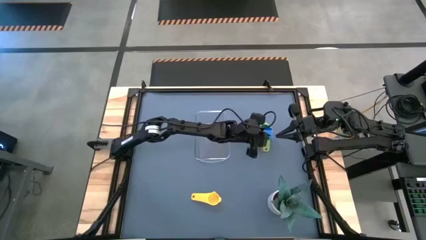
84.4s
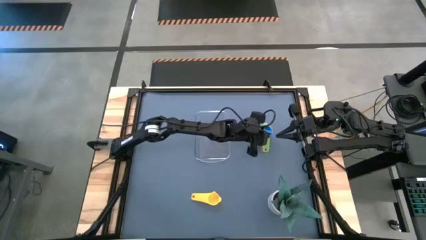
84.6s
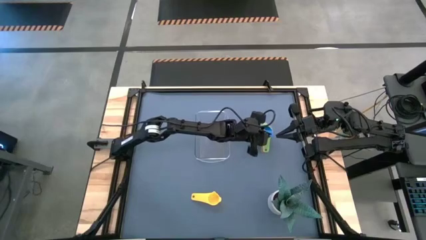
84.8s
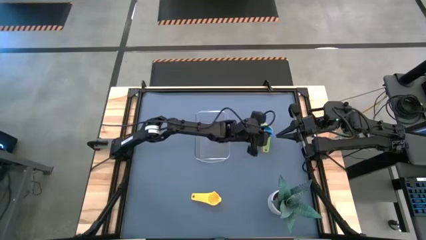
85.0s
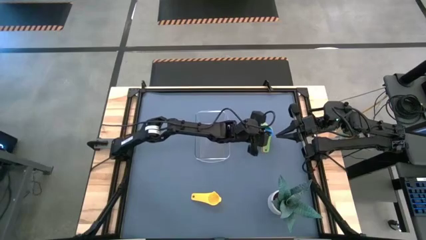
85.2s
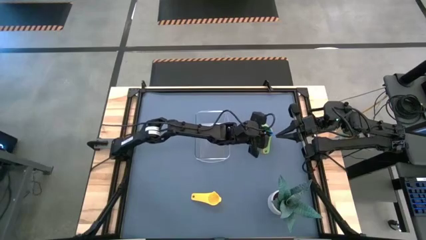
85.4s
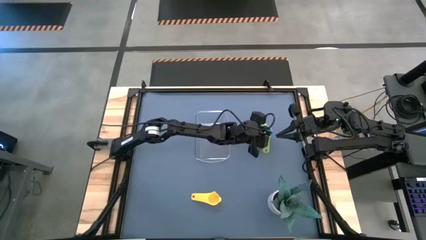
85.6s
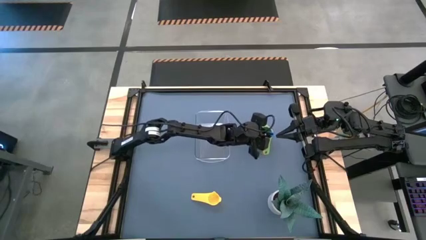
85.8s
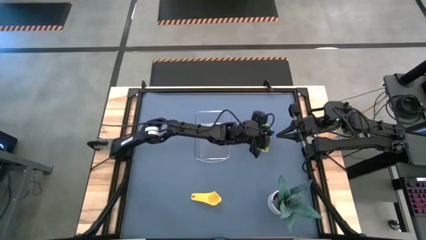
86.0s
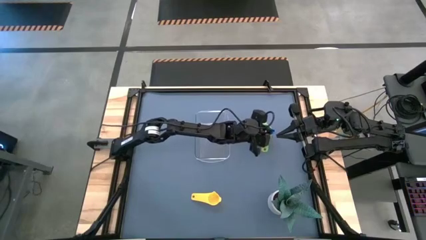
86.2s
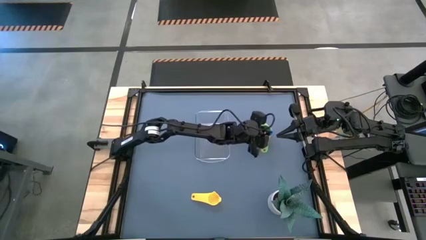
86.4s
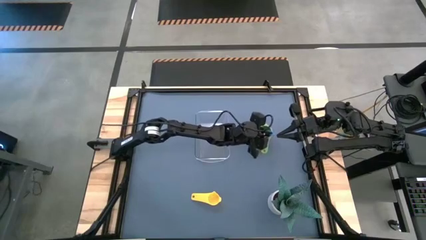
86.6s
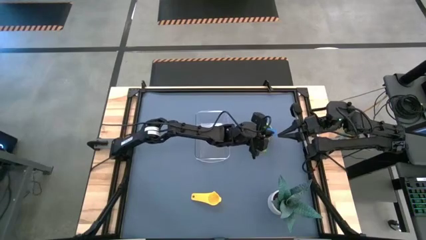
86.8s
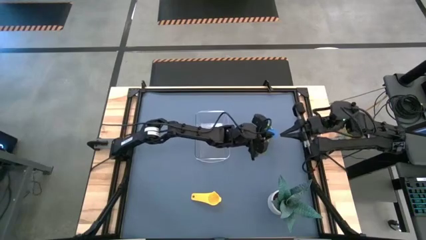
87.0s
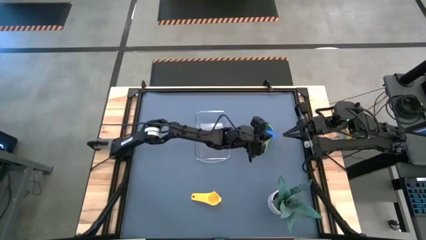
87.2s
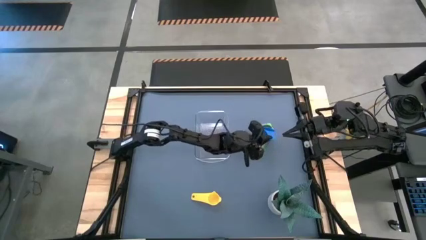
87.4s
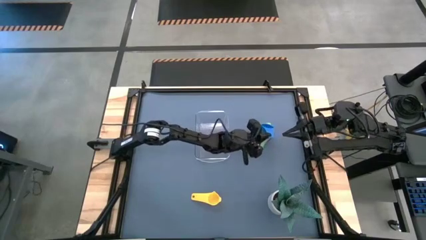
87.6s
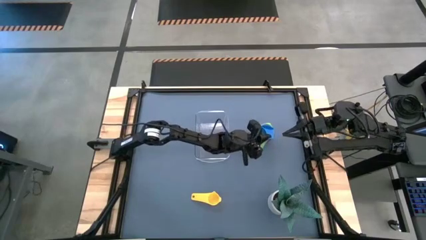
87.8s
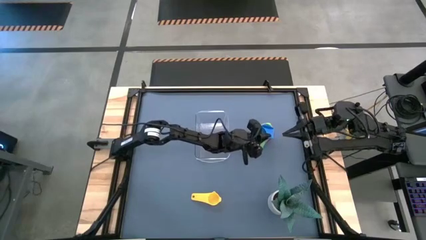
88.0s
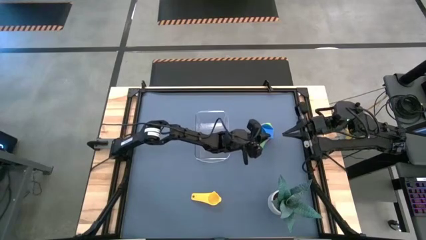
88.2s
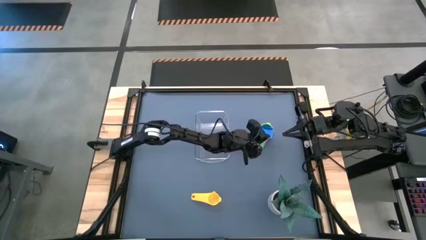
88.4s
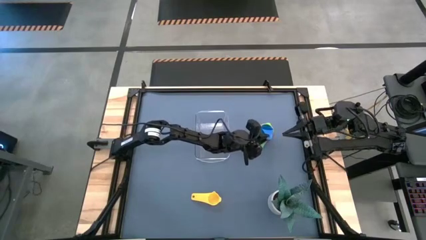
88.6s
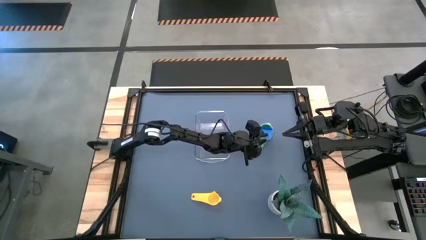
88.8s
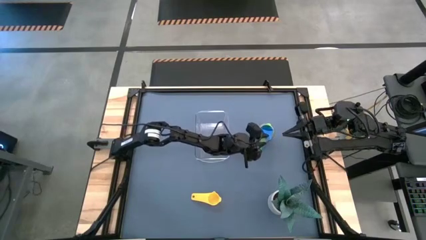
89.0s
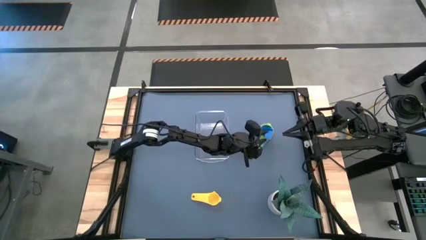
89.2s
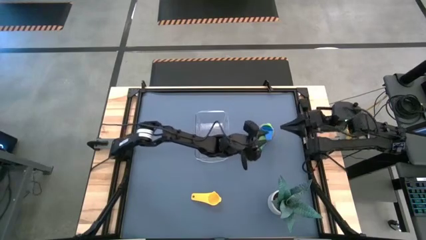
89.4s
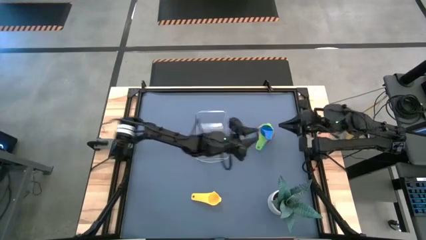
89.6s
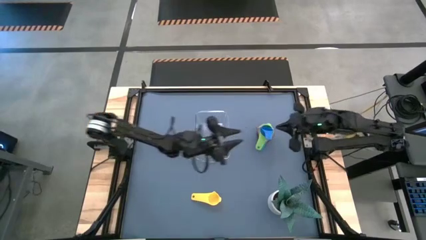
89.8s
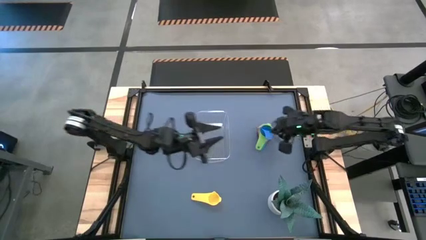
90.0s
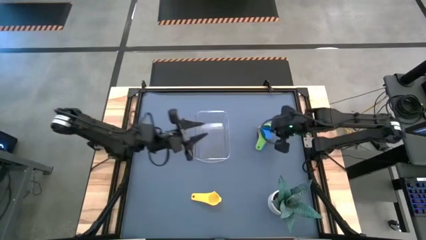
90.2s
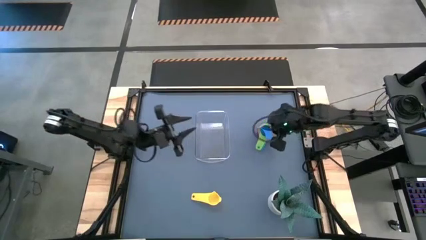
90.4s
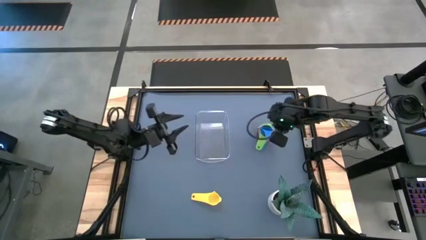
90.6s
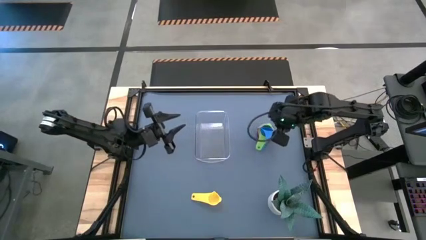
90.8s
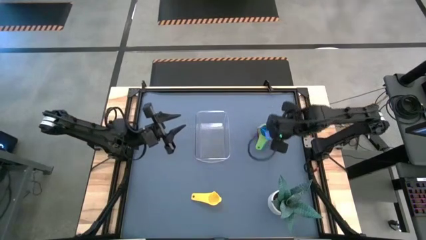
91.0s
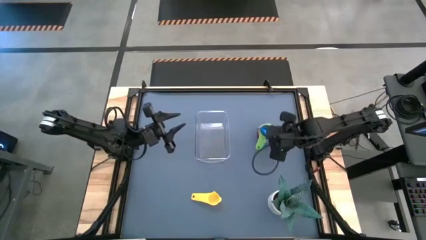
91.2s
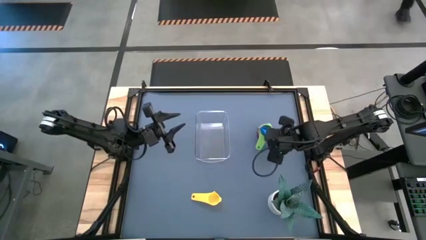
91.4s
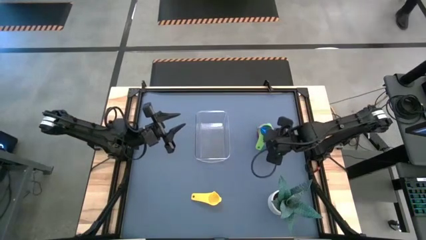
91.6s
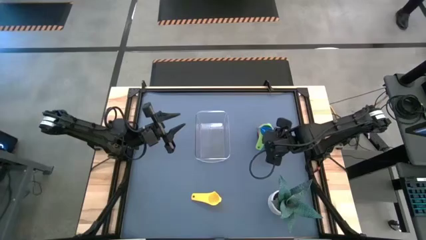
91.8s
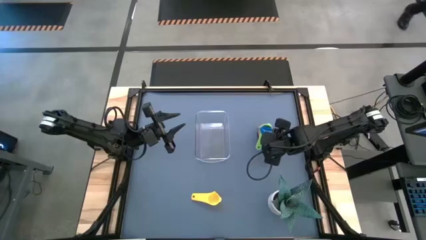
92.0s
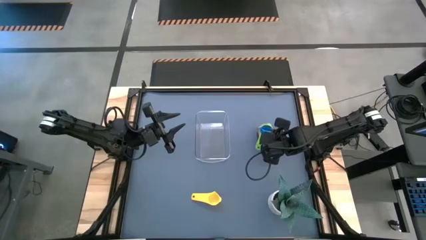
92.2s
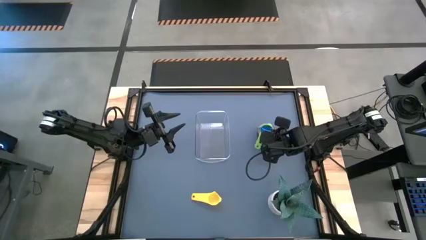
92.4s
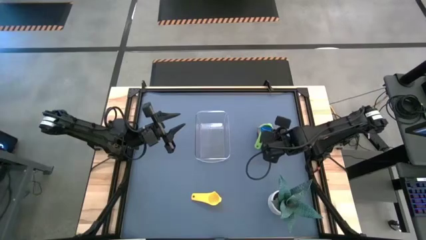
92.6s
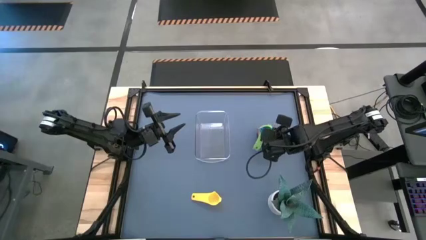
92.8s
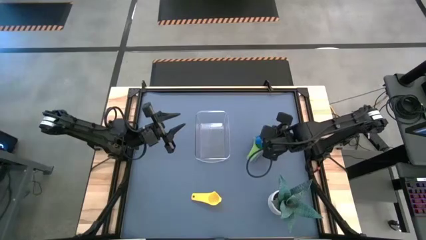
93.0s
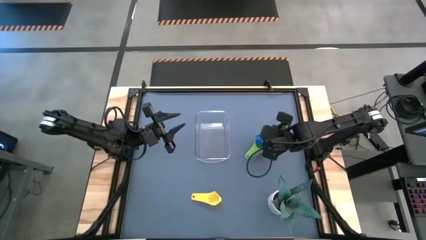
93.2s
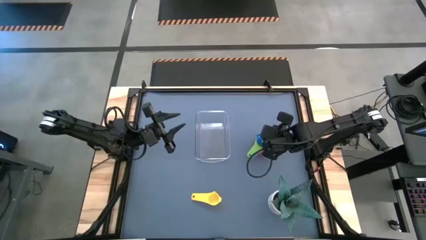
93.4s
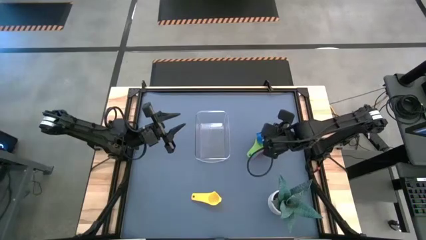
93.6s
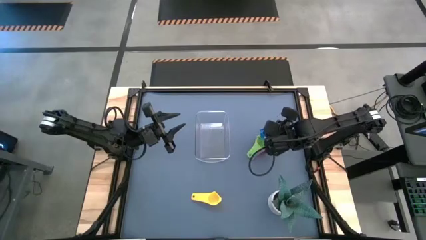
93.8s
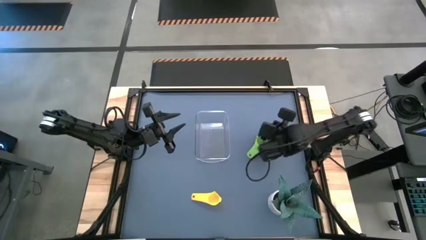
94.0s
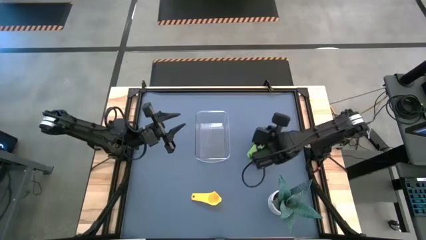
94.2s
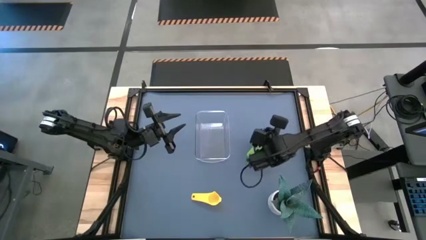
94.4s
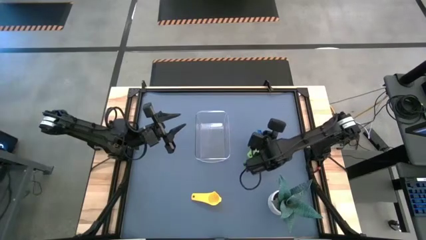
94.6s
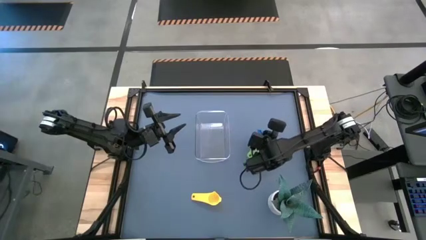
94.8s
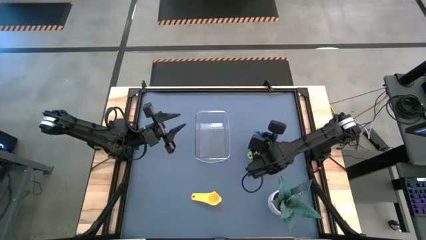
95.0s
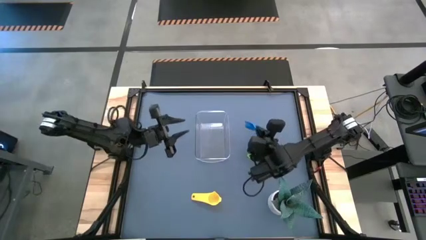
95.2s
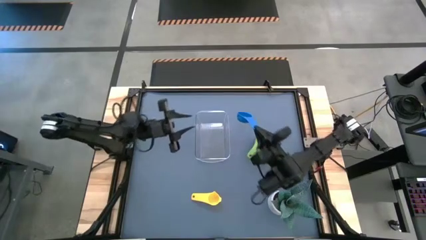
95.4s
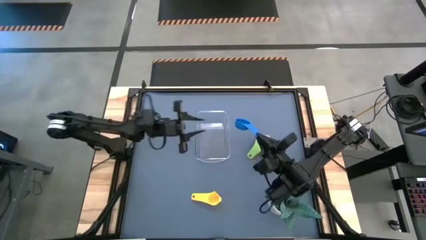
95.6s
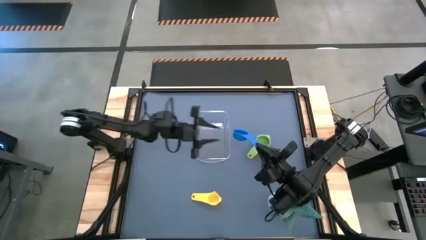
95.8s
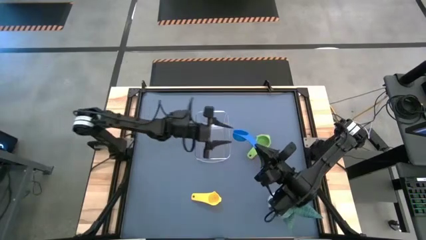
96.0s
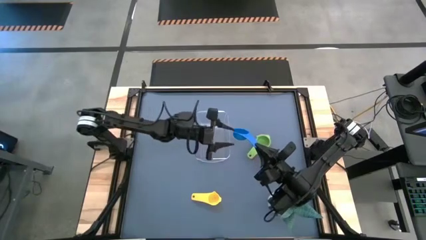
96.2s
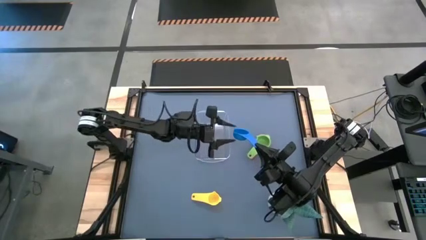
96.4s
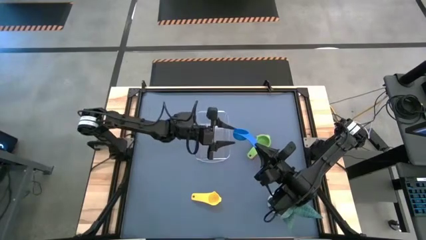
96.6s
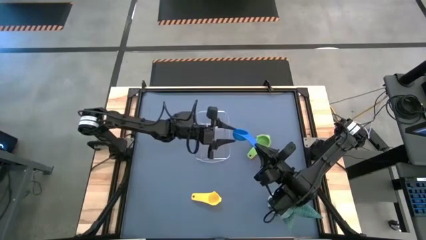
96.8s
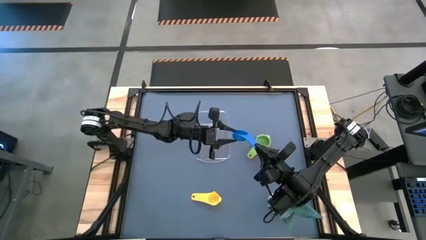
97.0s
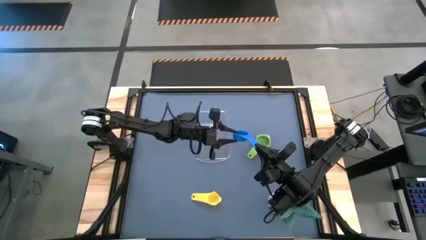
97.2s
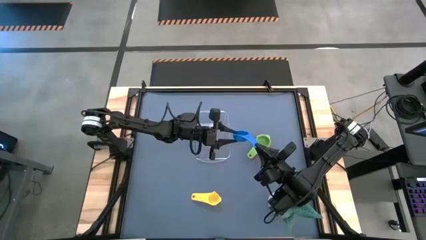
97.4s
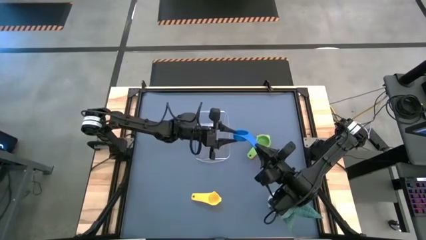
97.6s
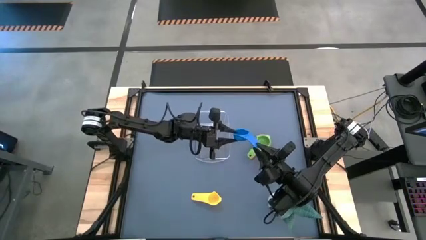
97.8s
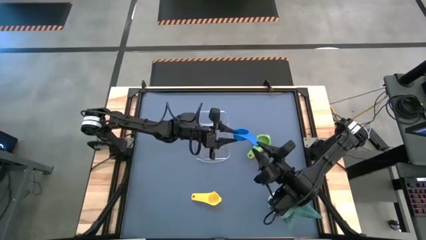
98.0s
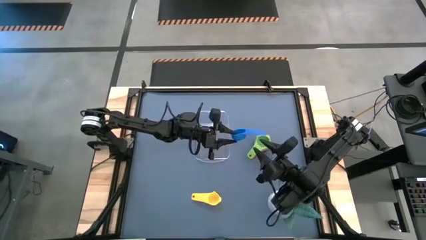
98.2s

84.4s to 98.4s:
Task: Nest measuring cups in basket
Stack the blue measuring cup on top of the green measuring cup
